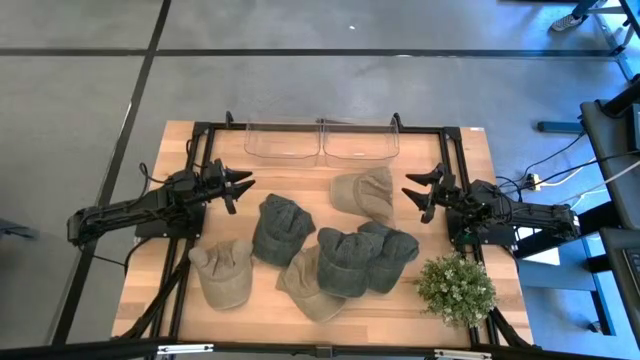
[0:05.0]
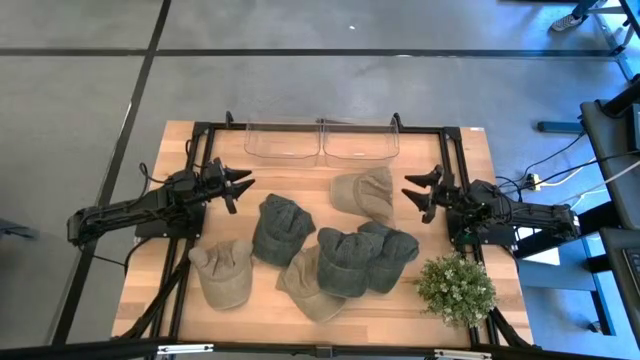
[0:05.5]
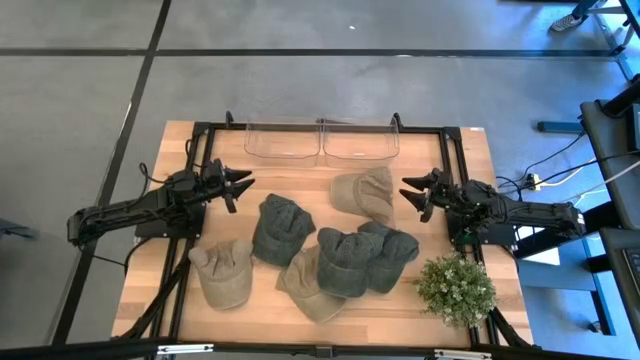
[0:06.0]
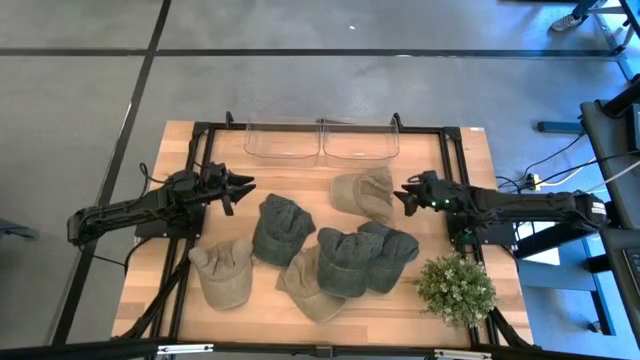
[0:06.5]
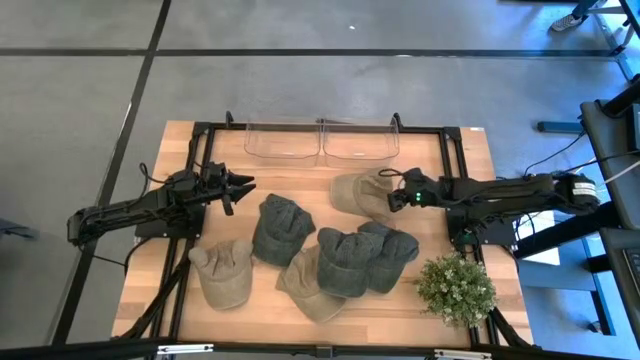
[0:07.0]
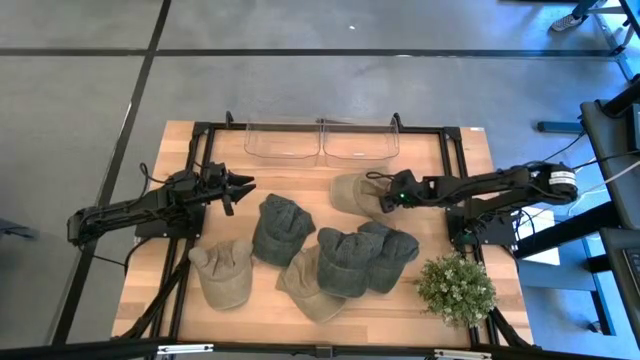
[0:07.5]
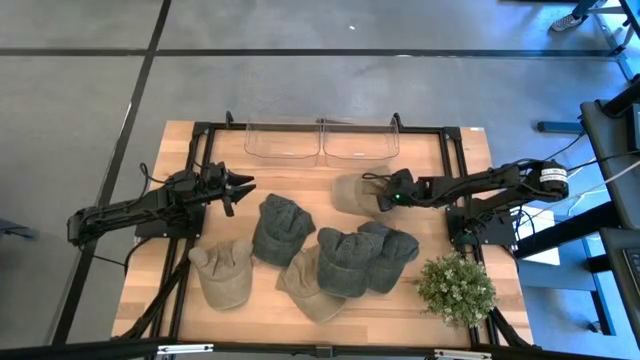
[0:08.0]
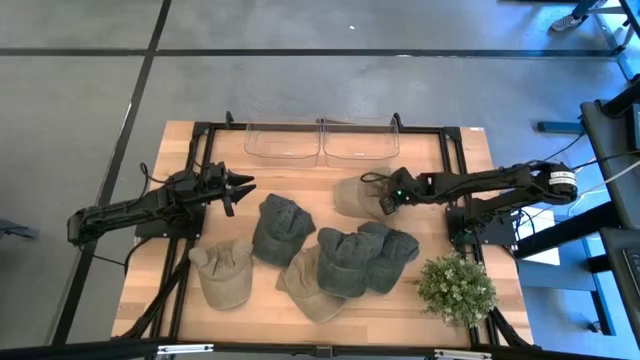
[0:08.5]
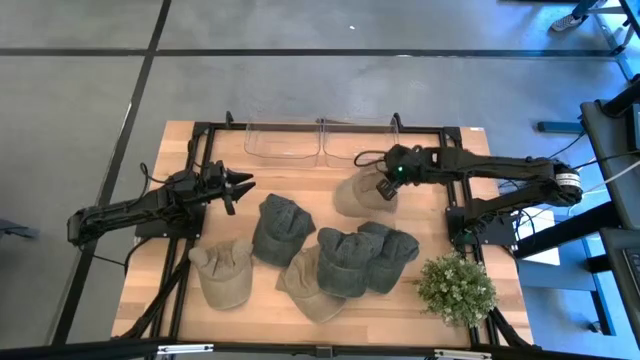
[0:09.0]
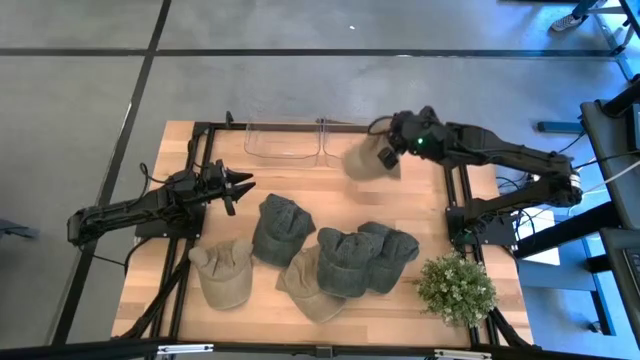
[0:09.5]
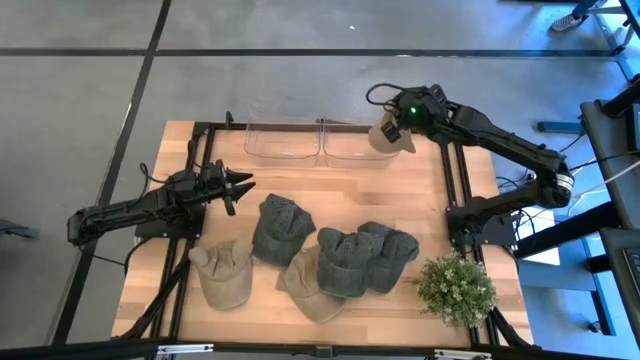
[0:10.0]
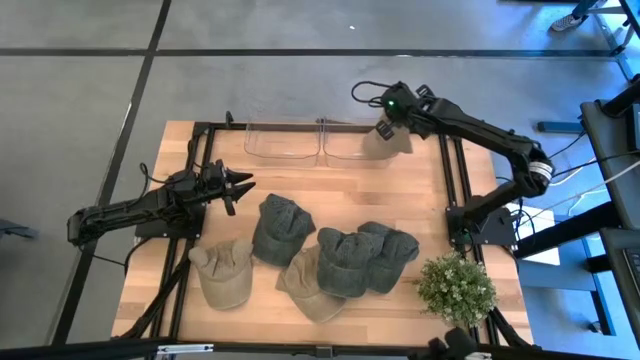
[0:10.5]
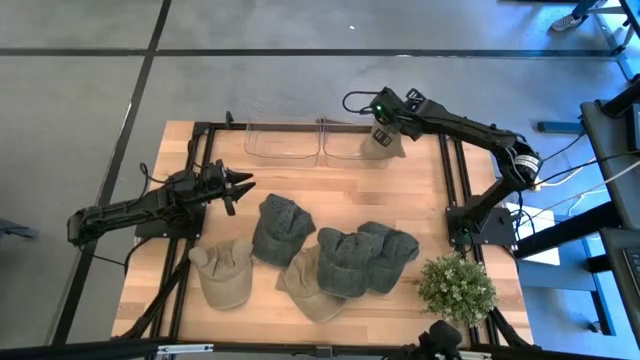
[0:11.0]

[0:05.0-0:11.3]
Task: Pick & Place hat
Put the top brown cap into the right transparent bin

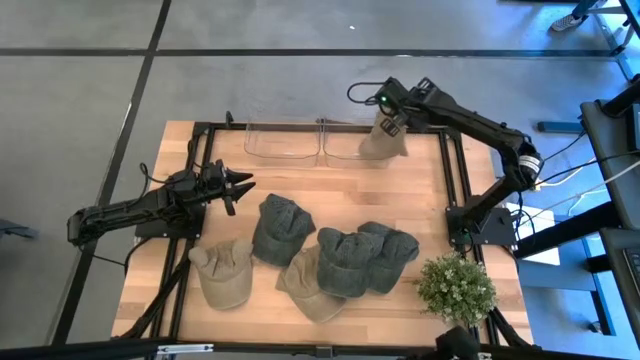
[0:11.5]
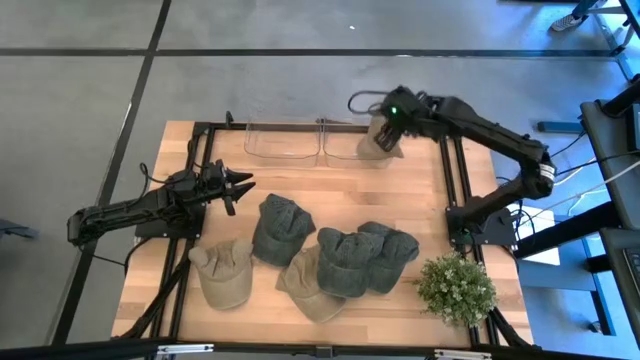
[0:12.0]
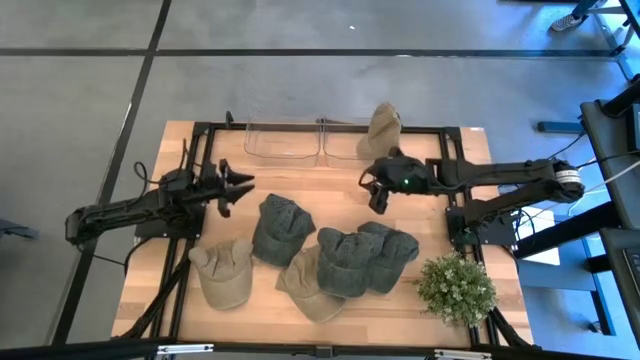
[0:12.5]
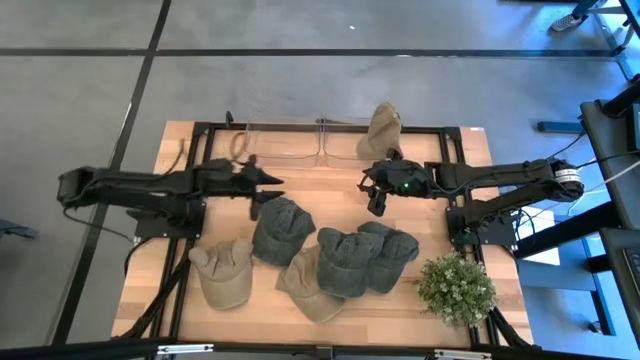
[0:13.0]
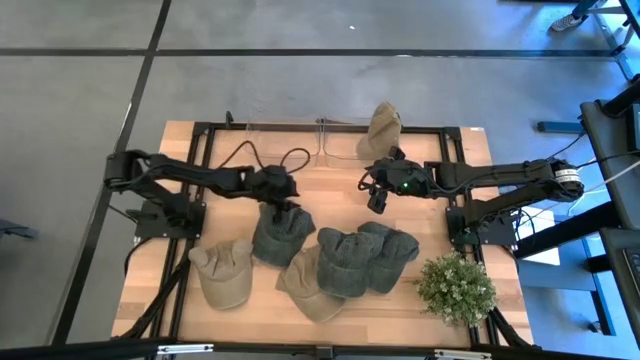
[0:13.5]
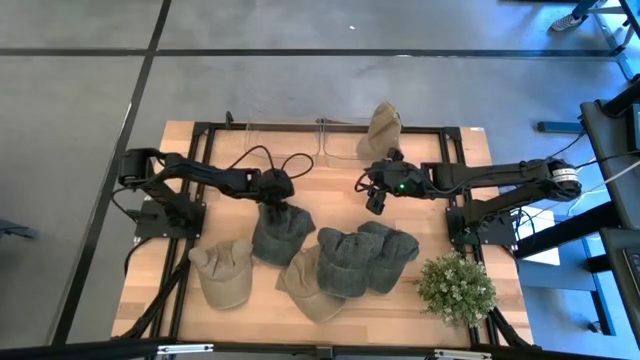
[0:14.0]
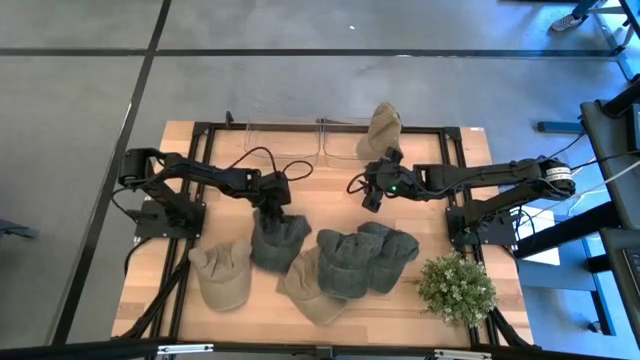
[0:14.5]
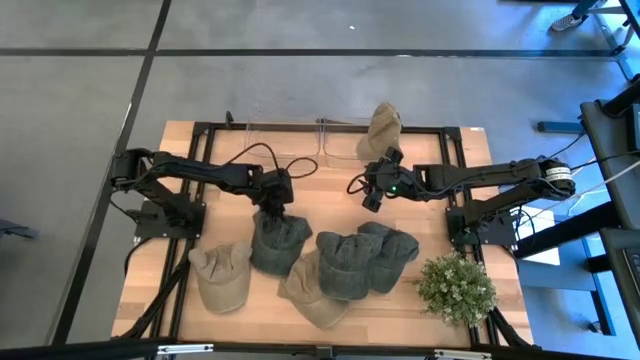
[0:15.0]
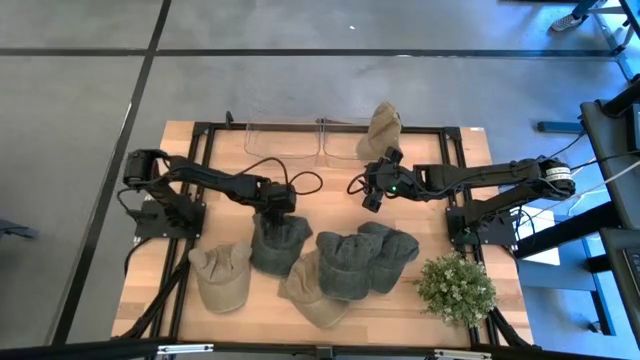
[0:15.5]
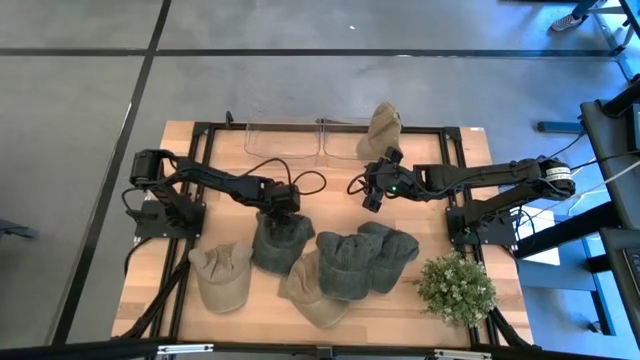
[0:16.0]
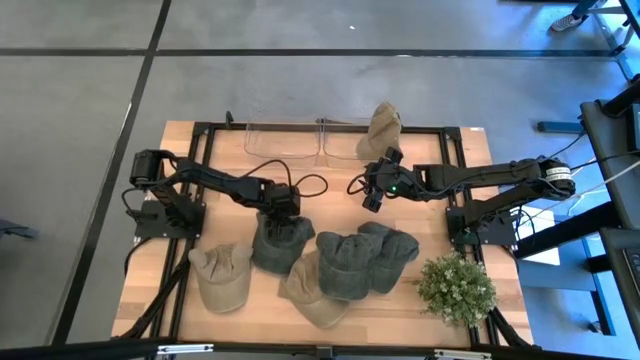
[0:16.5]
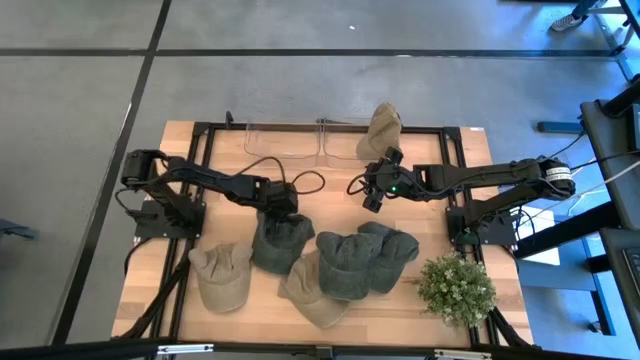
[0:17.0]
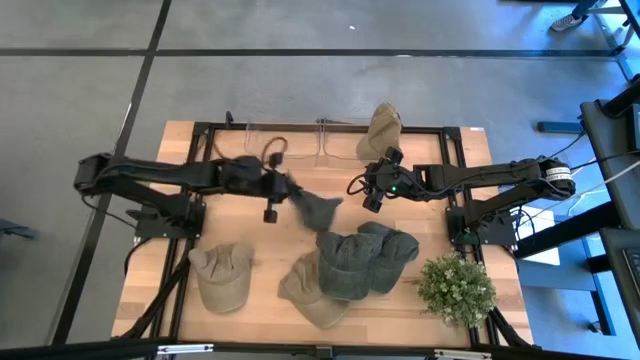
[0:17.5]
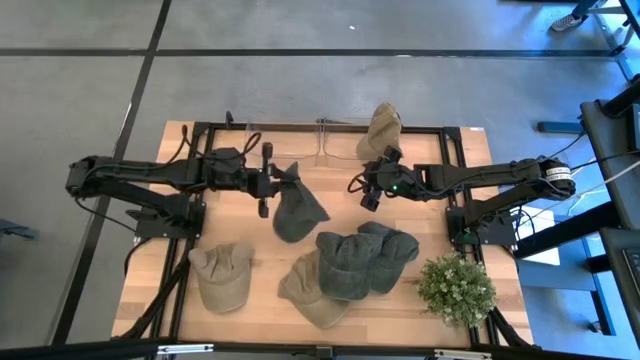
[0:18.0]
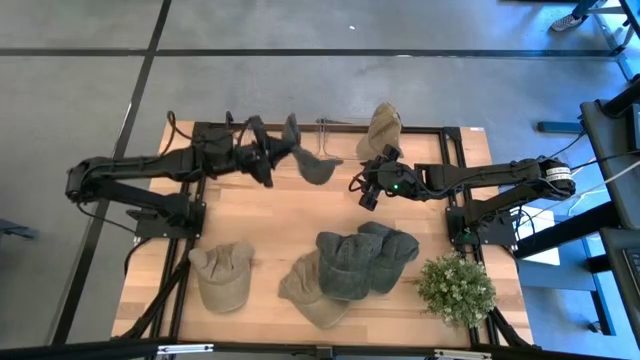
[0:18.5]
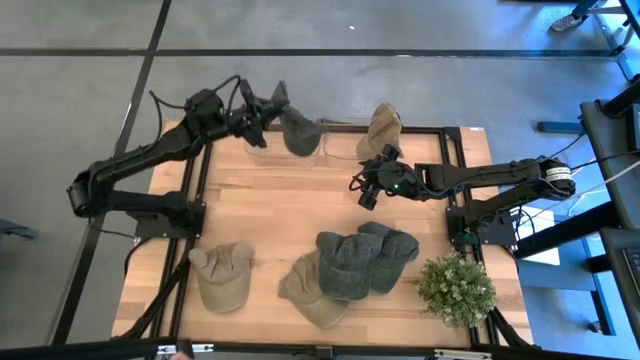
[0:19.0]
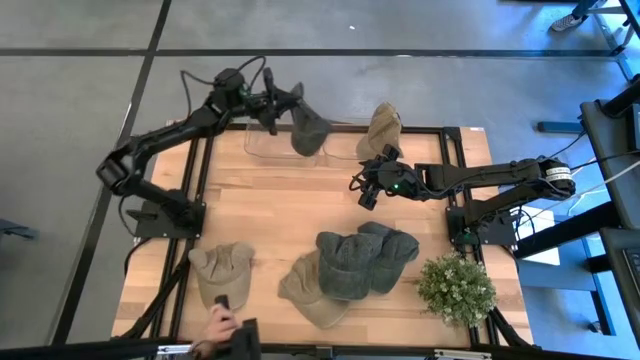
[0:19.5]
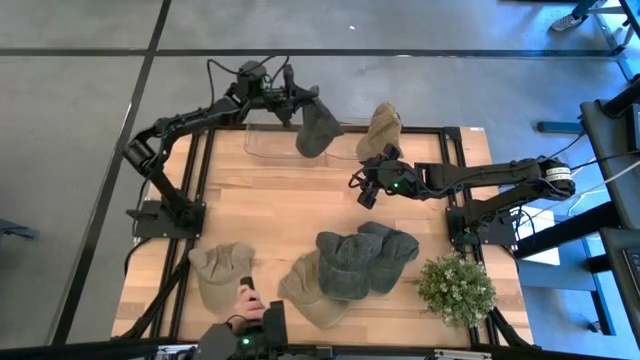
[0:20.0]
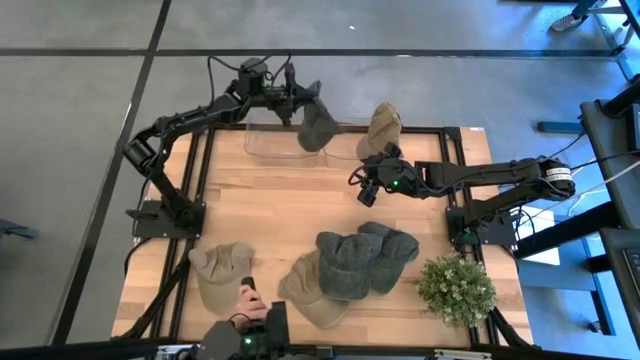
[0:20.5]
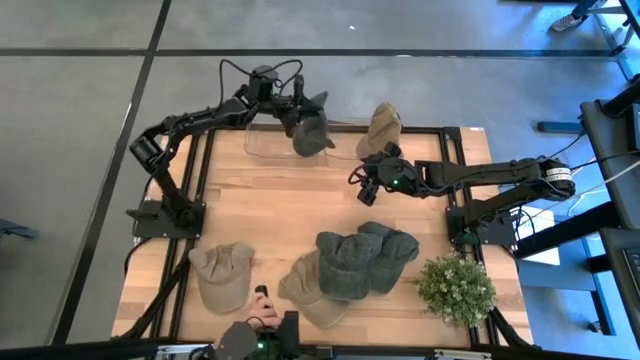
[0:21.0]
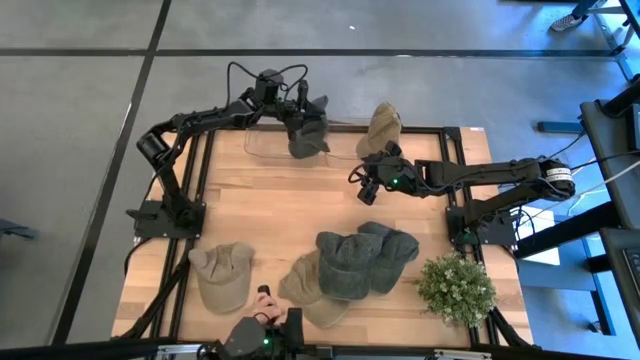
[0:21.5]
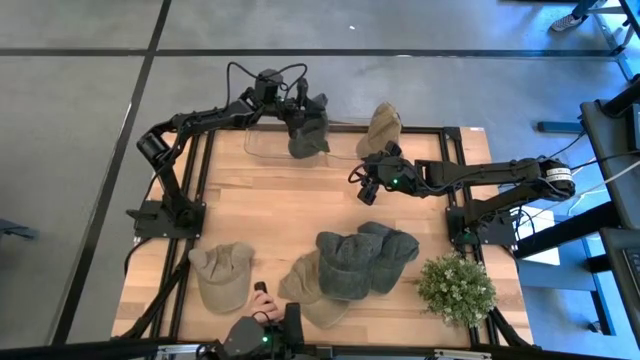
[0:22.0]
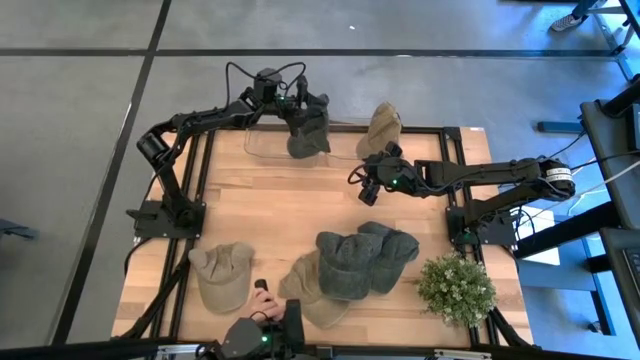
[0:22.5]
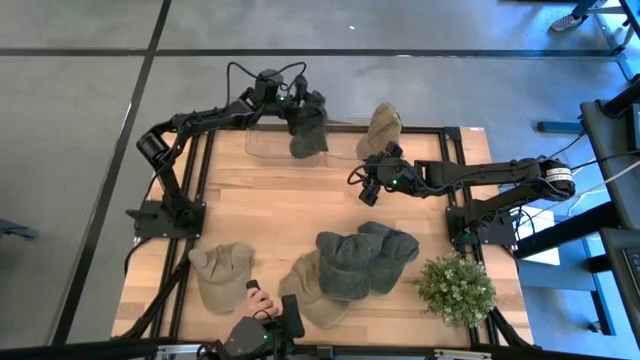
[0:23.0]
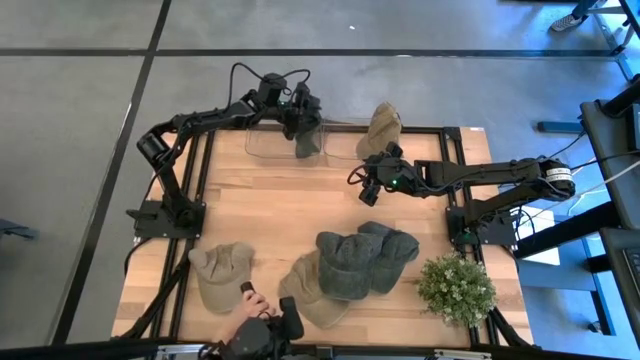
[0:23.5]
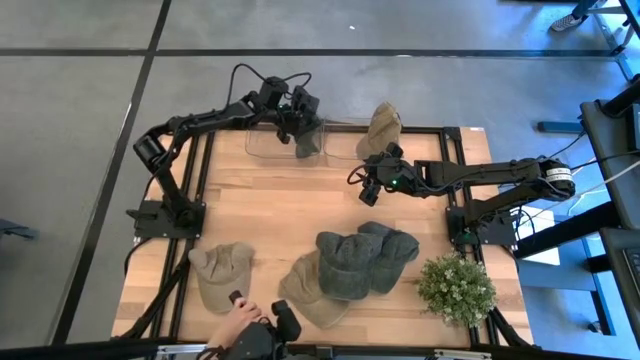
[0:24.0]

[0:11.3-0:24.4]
Put the left black cap into the left transparent bin

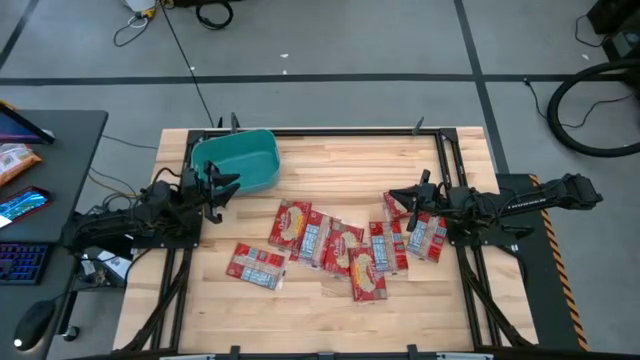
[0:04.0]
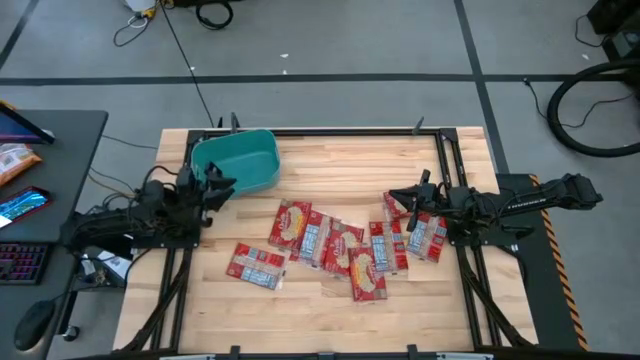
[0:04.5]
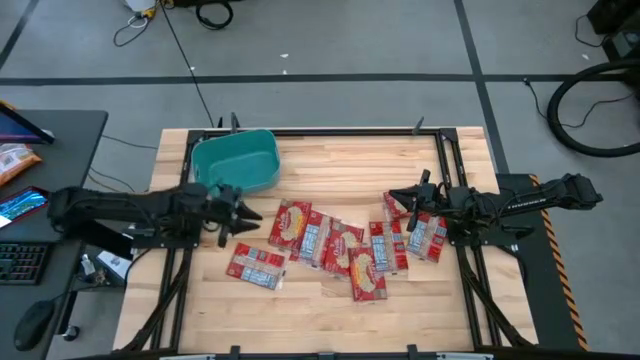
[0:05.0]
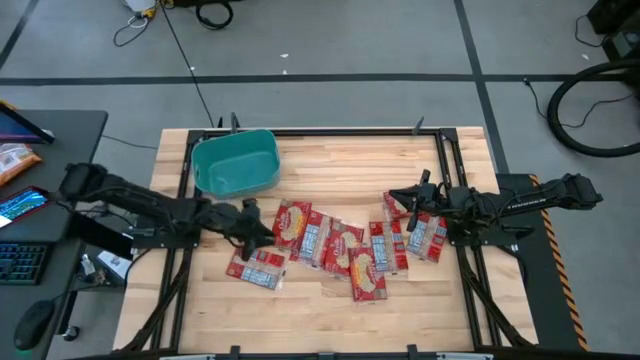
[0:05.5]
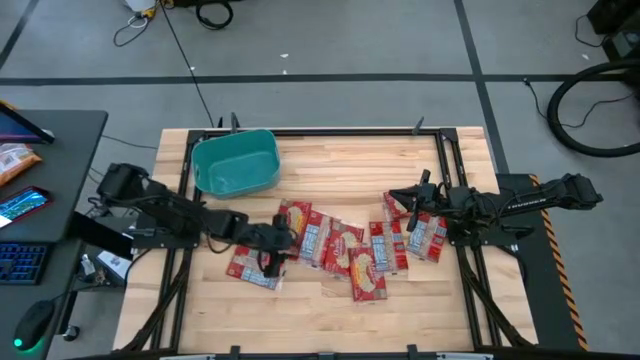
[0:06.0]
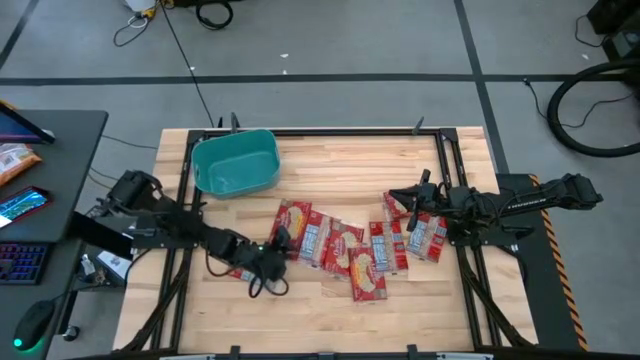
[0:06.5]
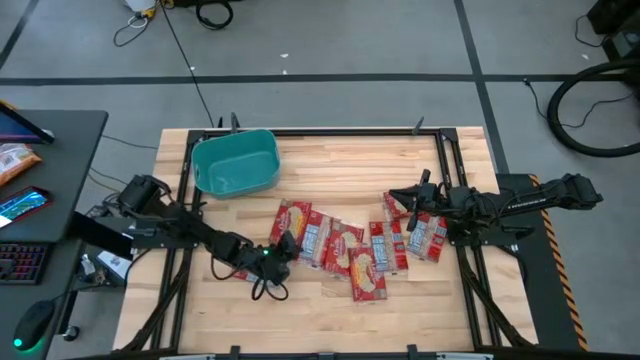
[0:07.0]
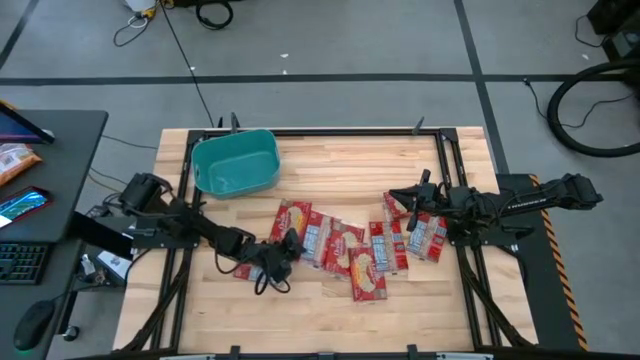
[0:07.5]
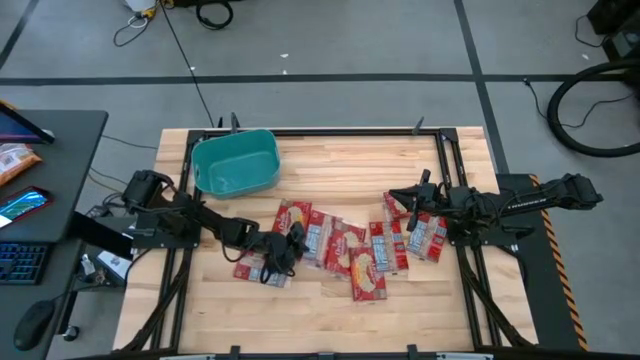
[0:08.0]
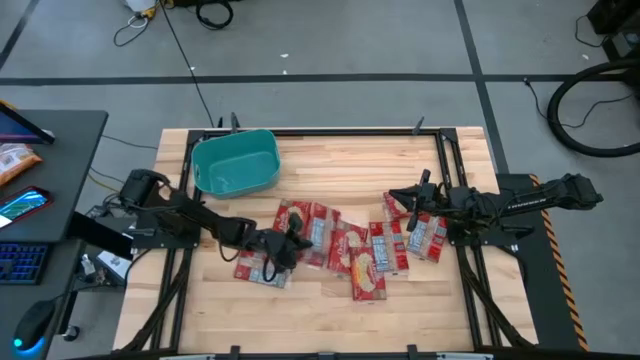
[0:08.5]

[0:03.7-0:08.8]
Task: Sort popcorn bags into baskets
Put the red popcorn bag into the green bin
